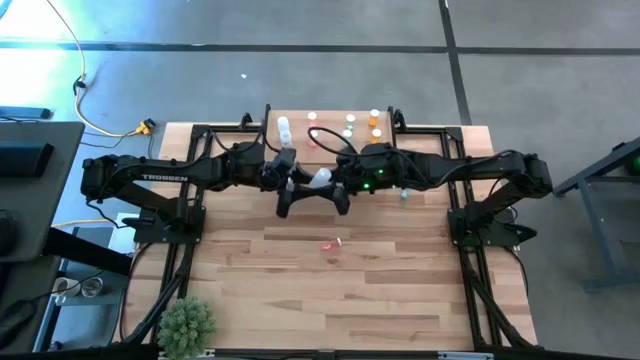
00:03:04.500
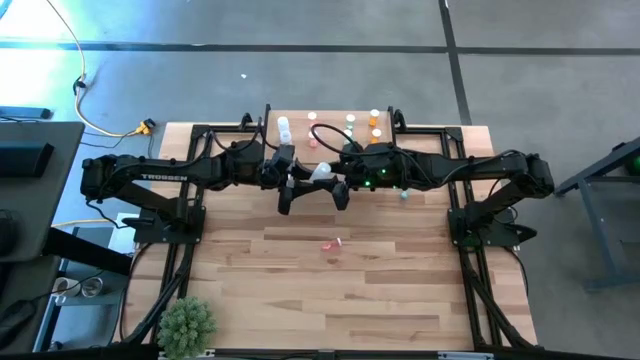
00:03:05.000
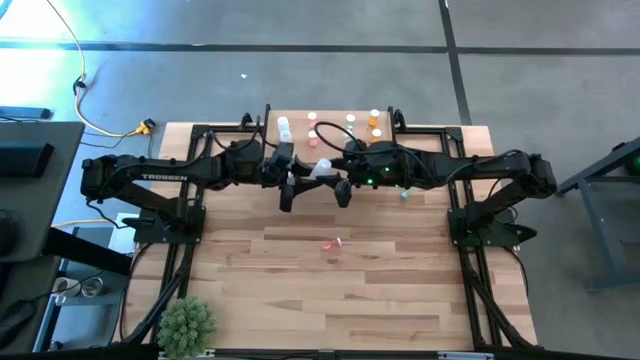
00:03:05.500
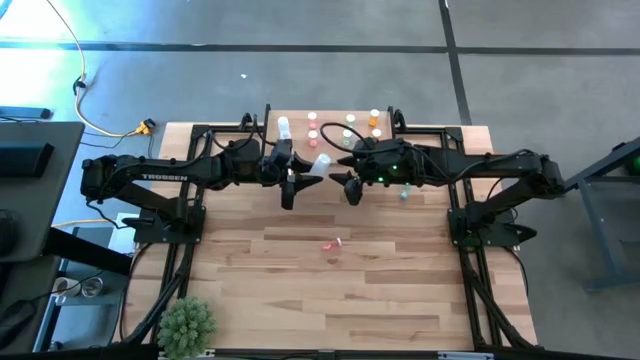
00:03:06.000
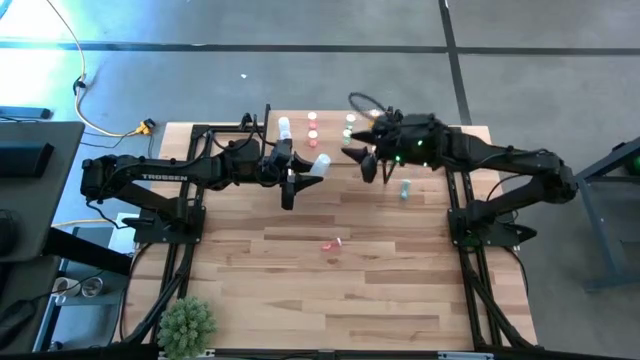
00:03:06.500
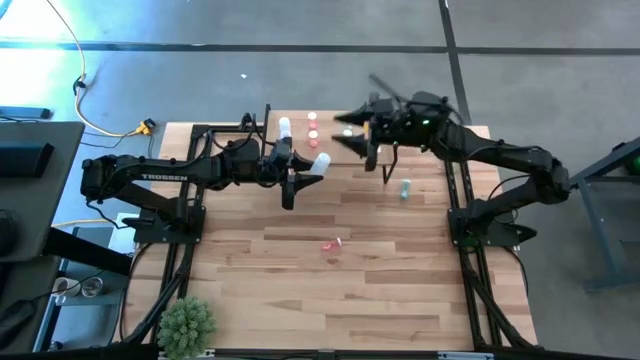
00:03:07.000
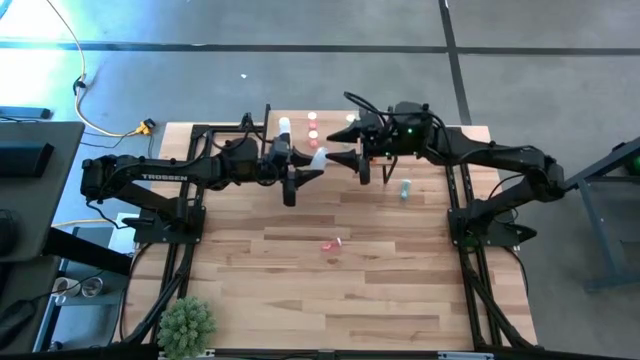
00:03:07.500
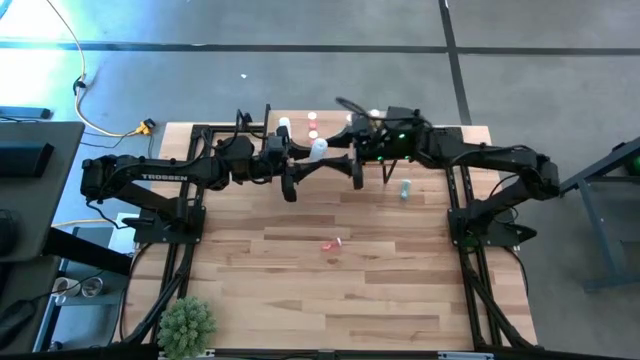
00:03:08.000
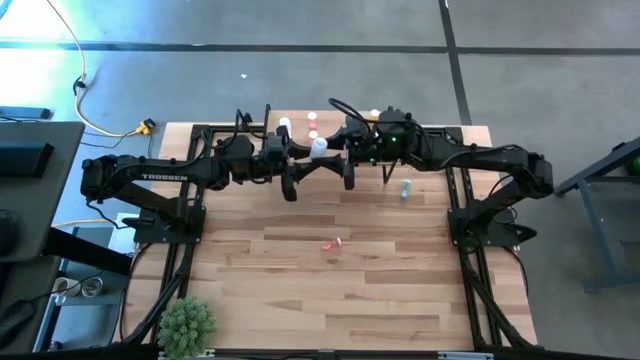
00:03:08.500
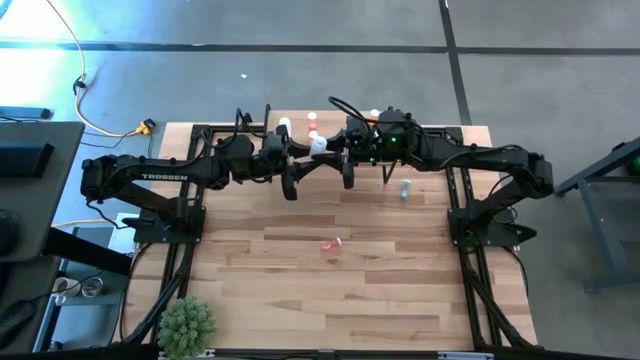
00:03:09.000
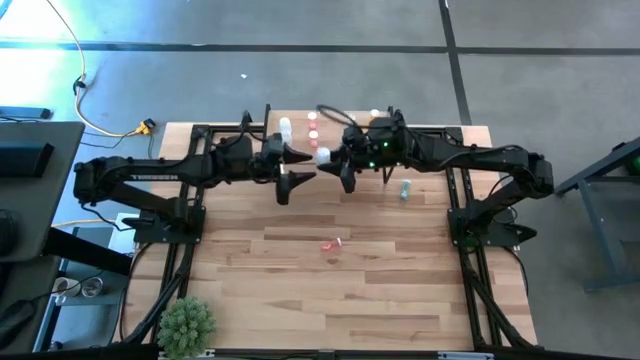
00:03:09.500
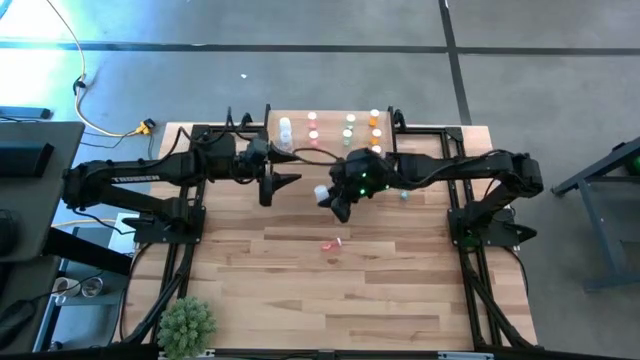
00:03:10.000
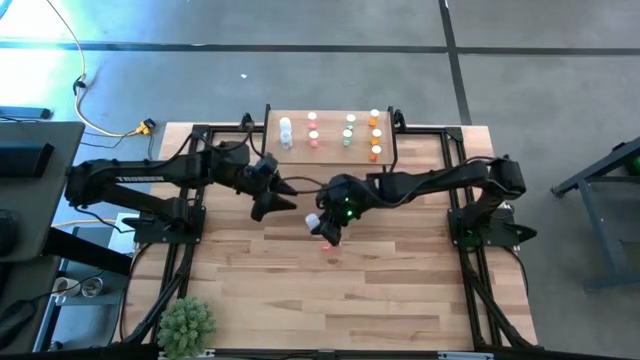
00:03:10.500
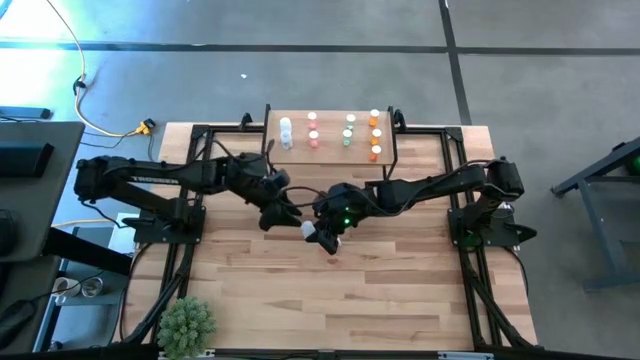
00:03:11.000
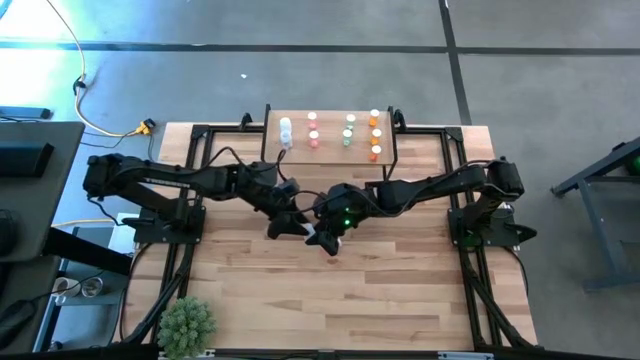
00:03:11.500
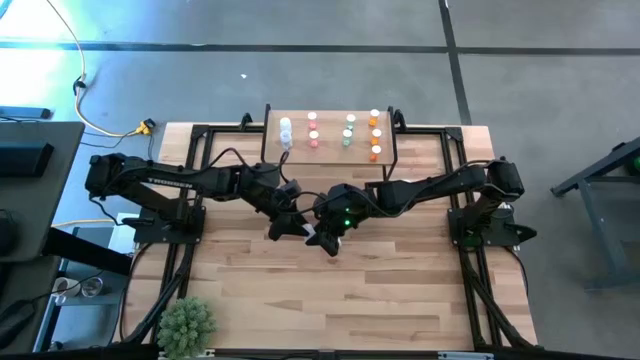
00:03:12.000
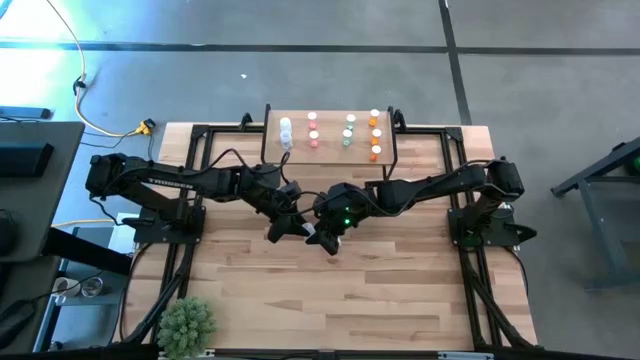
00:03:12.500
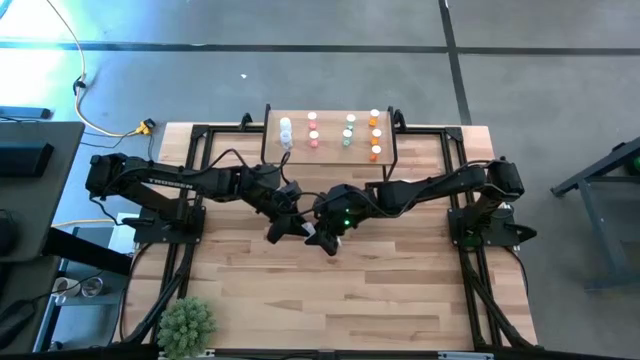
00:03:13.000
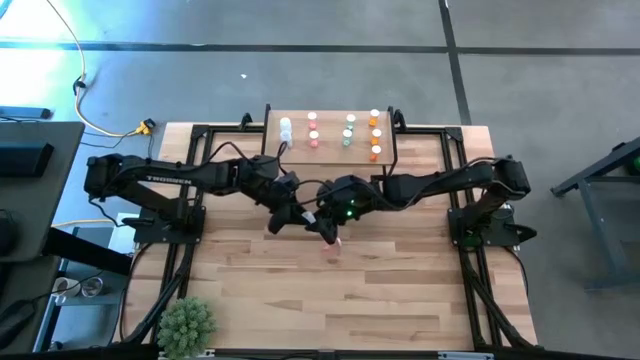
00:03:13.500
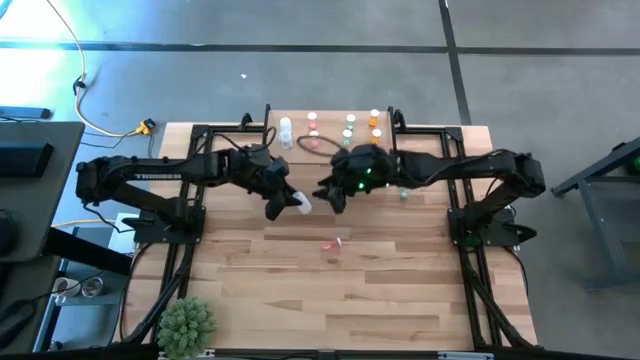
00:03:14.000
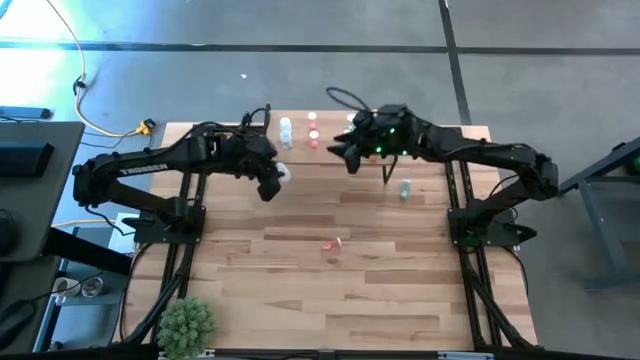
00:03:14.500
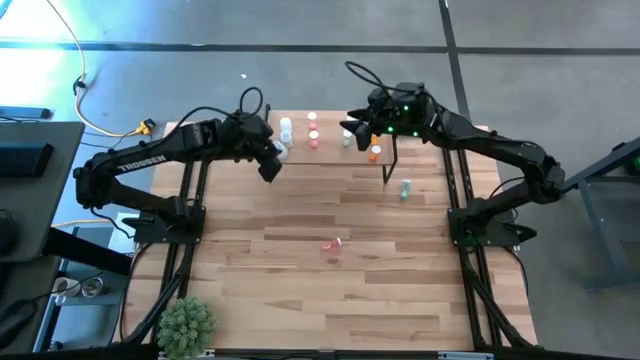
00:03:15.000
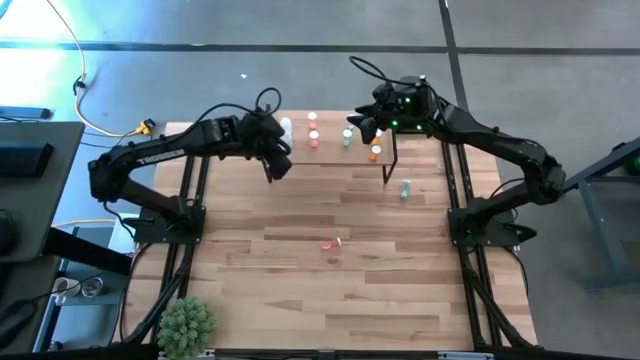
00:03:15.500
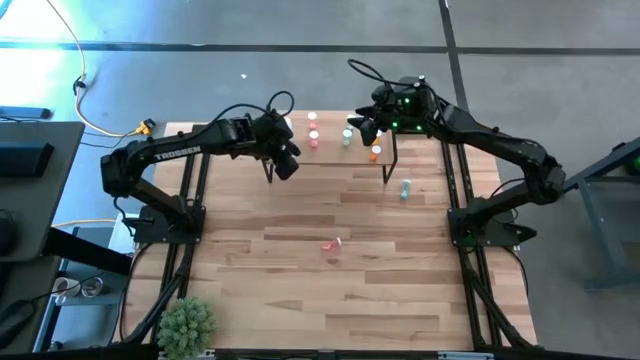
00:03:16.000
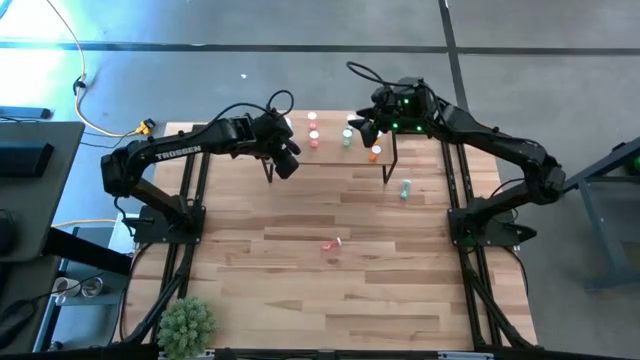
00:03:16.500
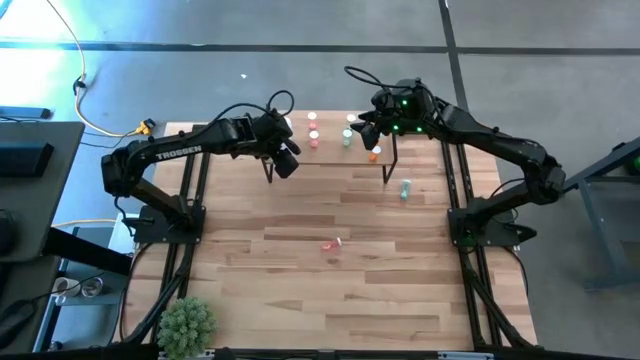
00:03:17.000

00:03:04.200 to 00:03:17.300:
Task: Pick and place medicine bottles onto shelf by color
Put the white pill bottle on the shelf aligned with the other white pill bottles

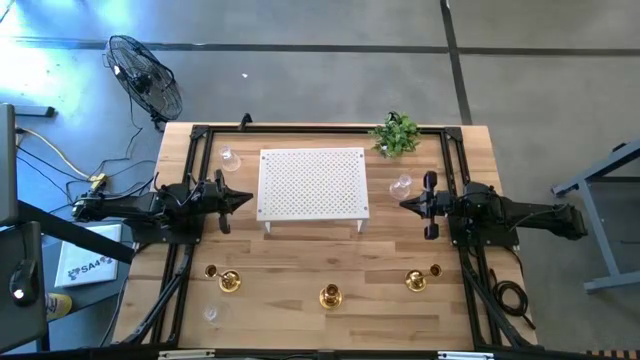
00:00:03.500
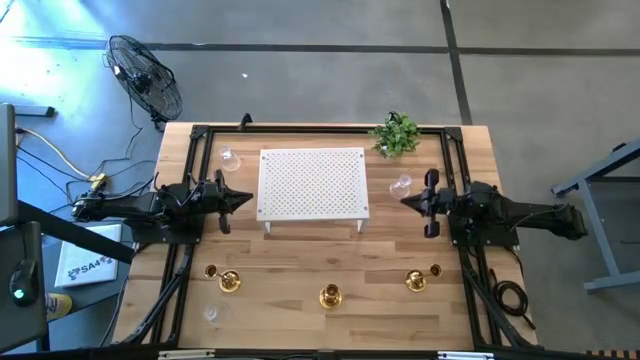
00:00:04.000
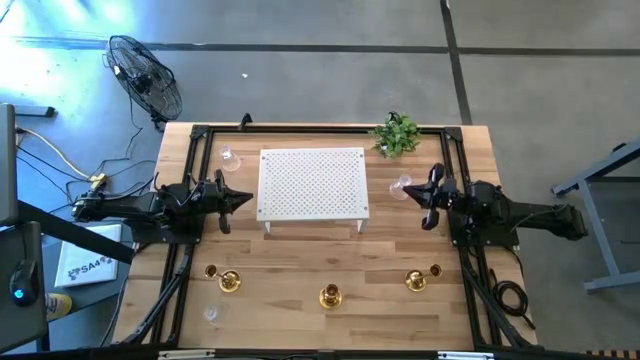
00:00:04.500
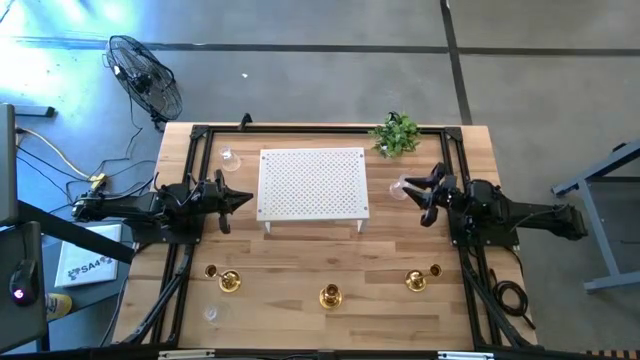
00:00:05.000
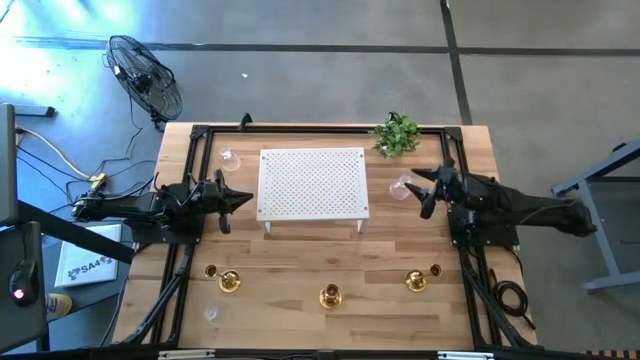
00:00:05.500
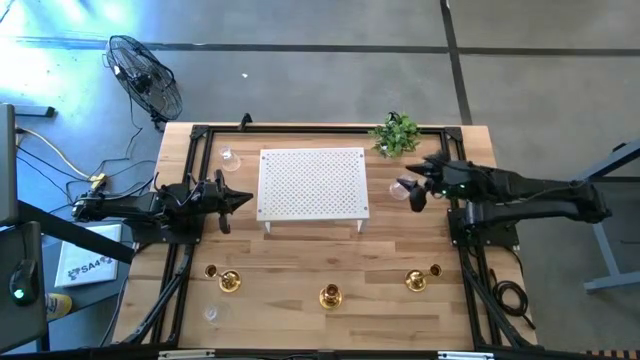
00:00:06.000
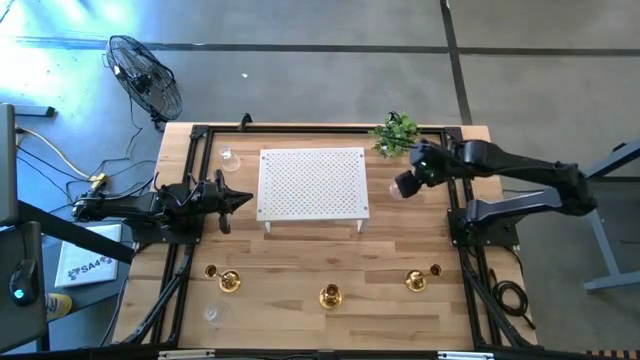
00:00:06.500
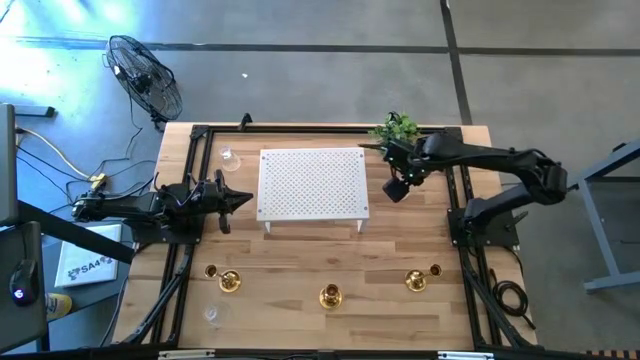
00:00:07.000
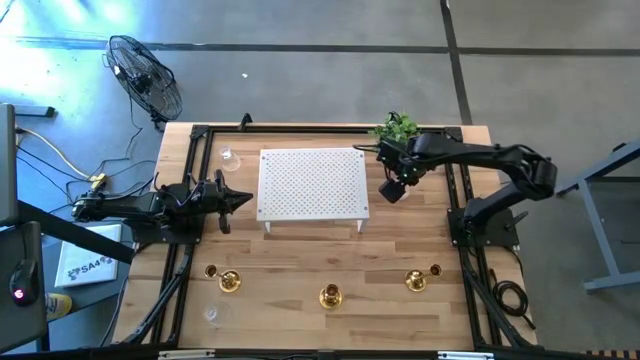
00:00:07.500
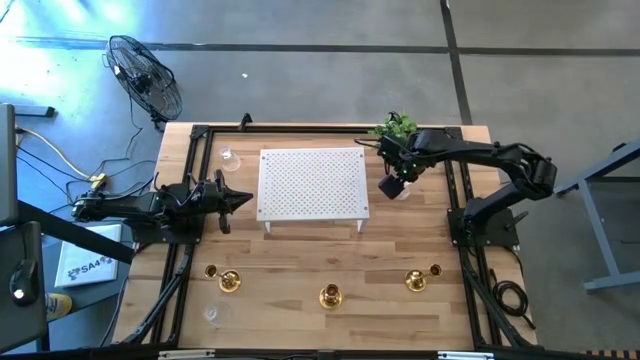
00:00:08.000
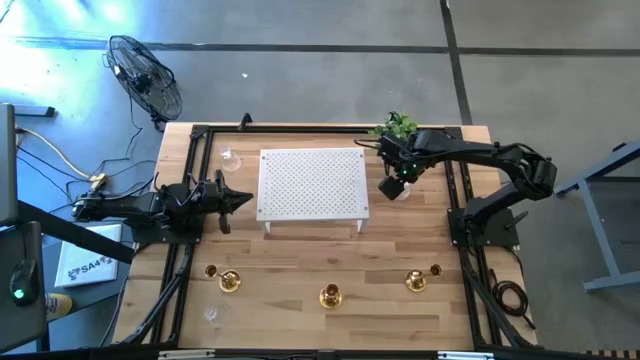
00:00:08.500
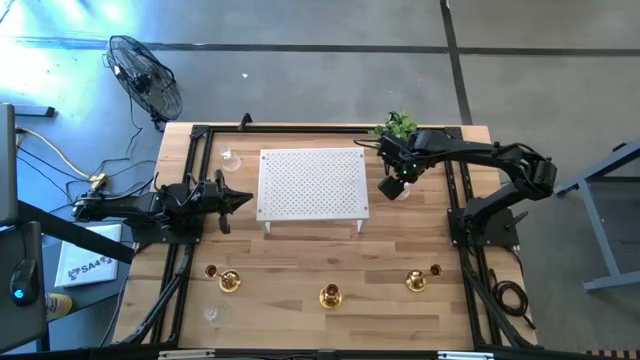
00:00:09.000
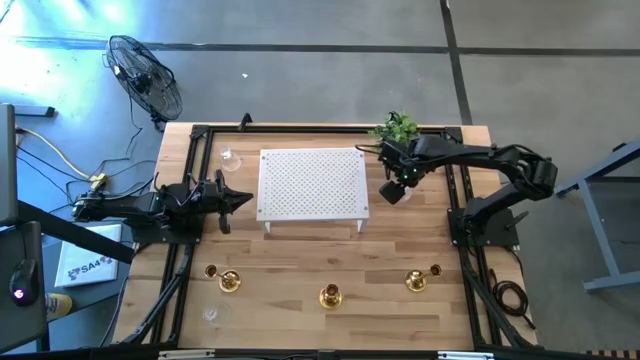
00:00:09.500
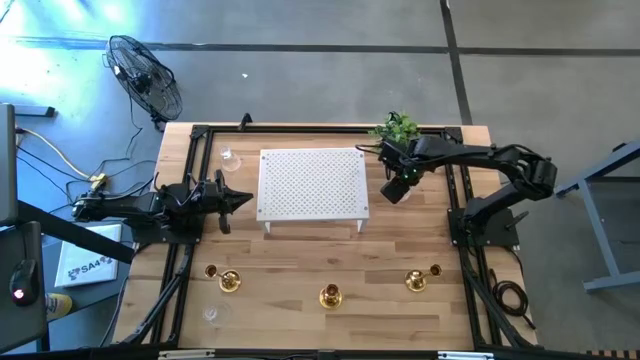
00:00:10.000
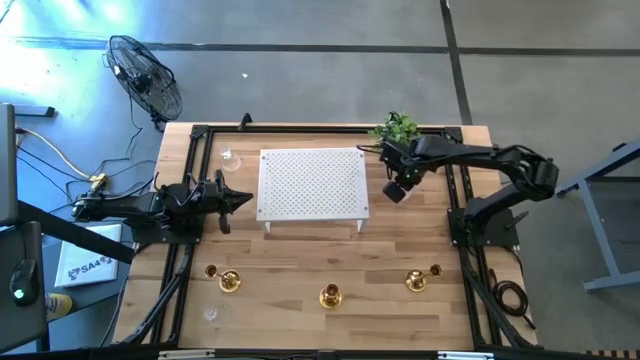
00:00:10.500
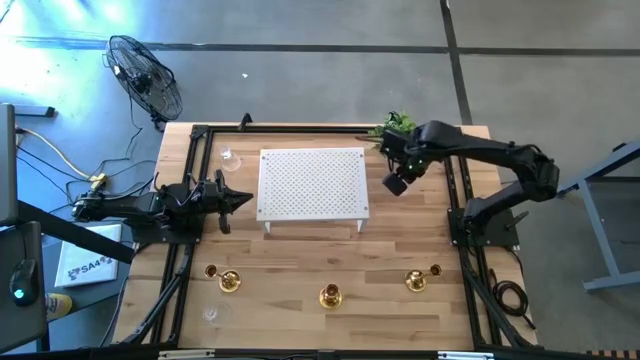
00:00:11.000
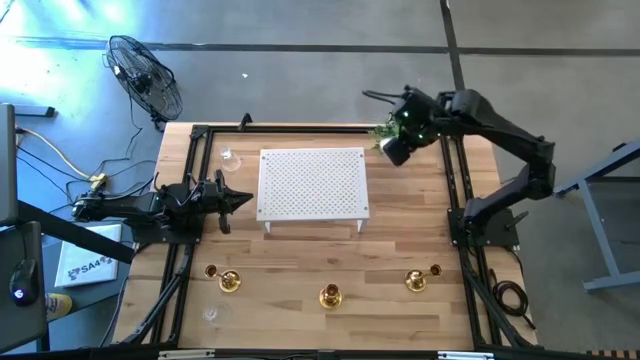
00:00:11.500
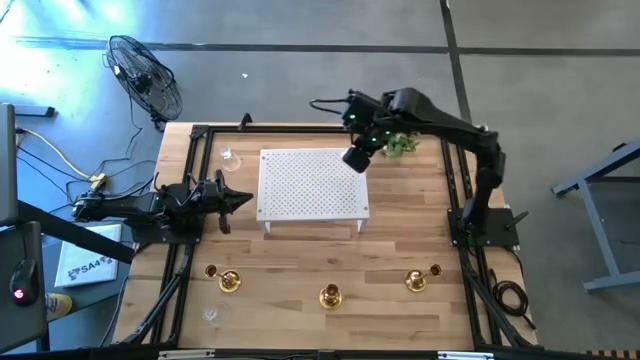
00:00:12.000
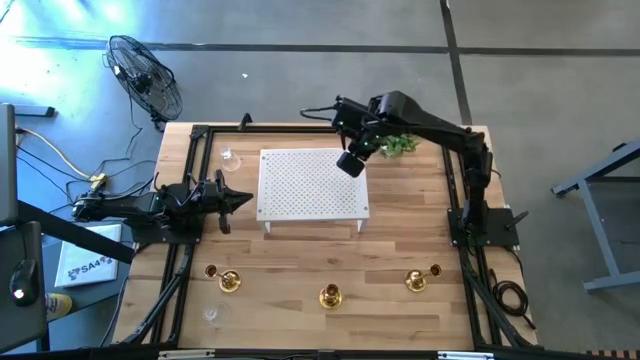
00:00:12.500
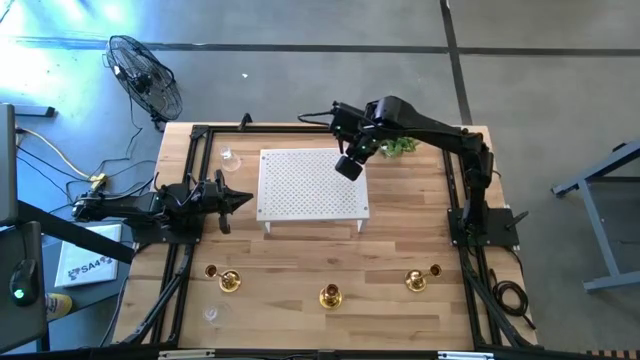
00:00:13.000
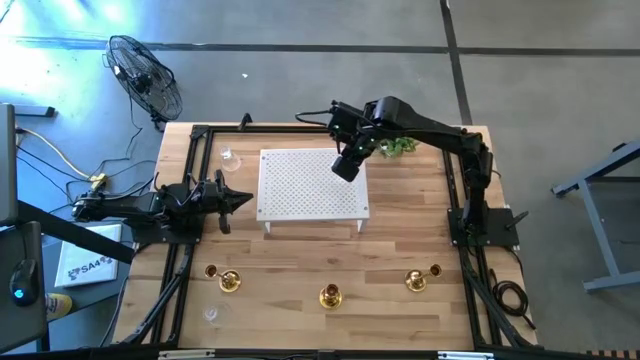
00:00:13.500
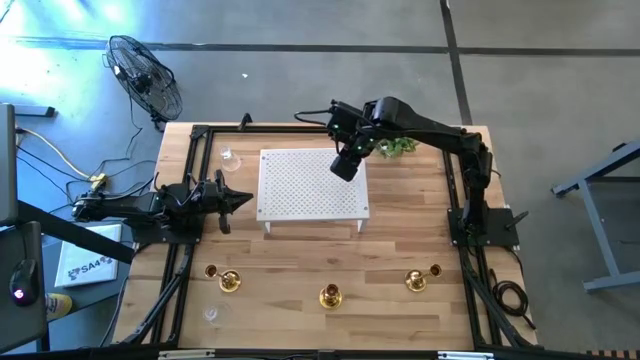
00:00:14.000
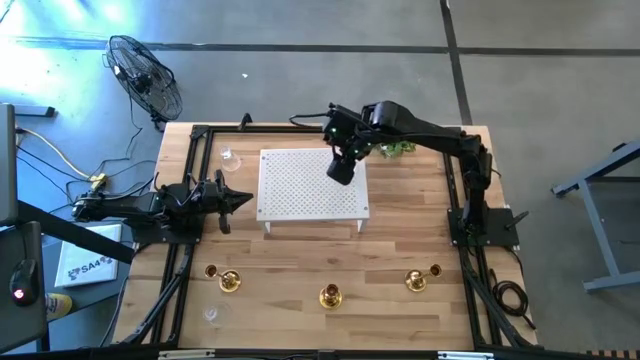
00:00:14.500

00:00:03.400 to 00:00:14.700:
Task: Pick & Place candle stick holders
Put the right transparent glass candle holder on the shelf
